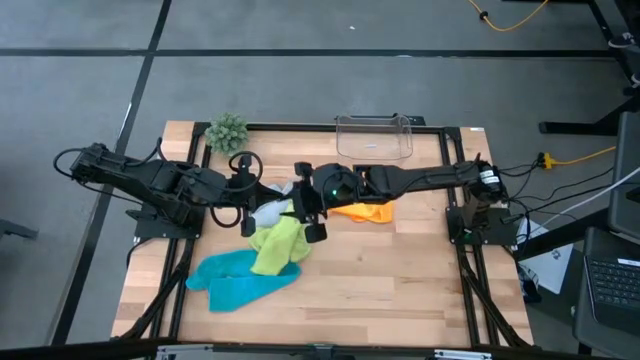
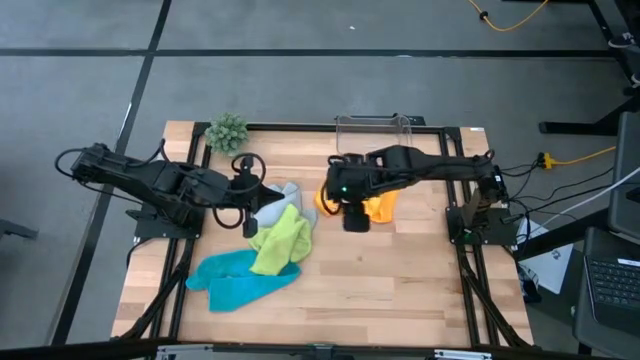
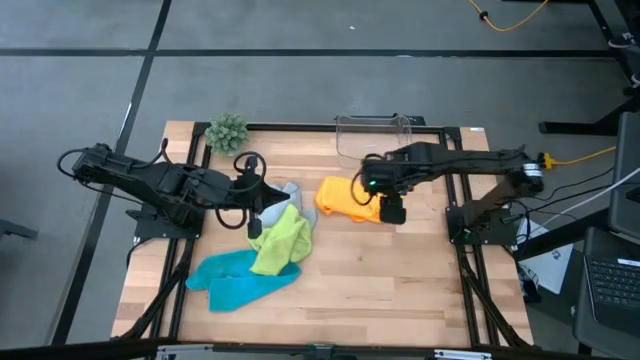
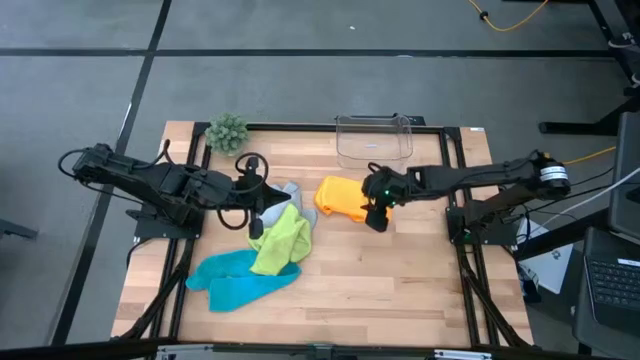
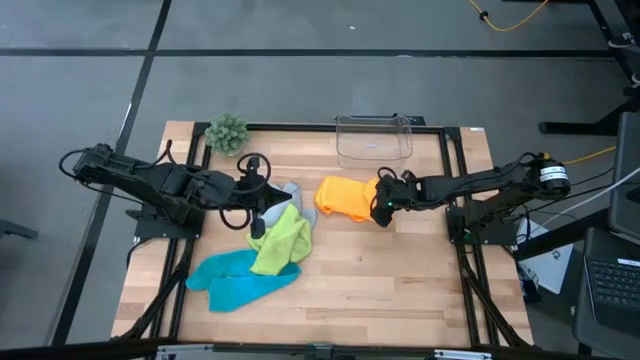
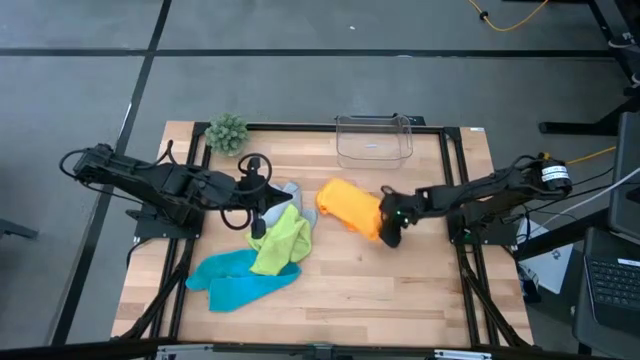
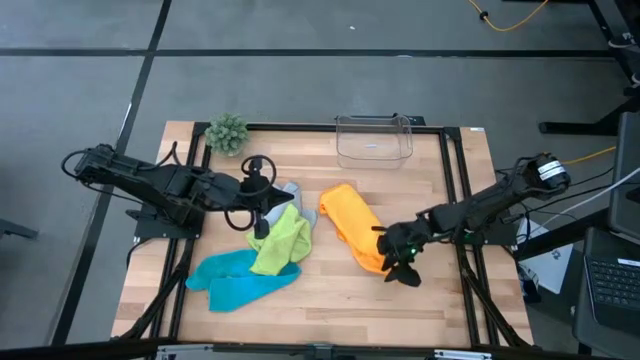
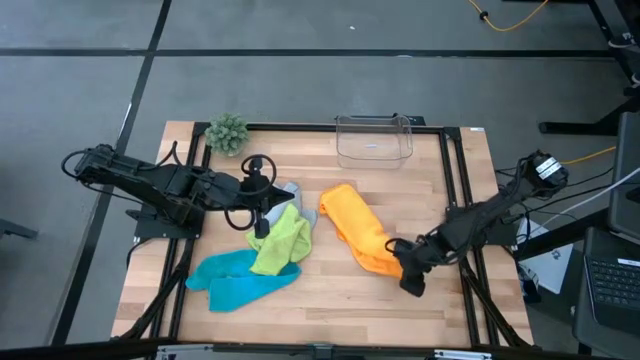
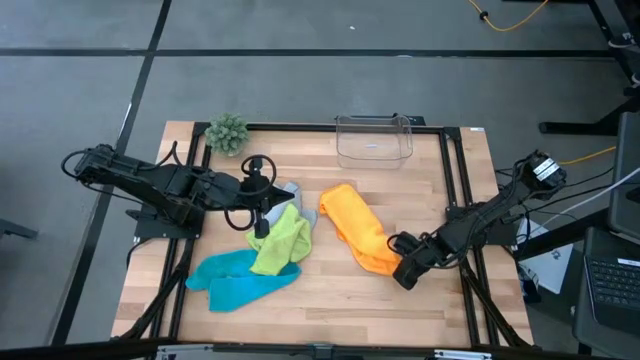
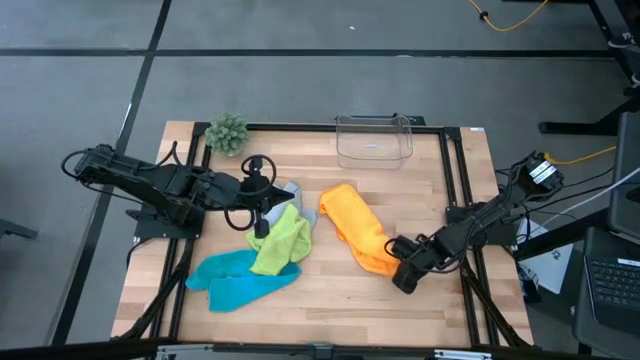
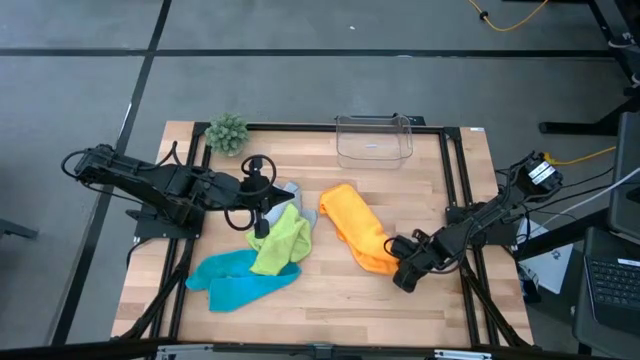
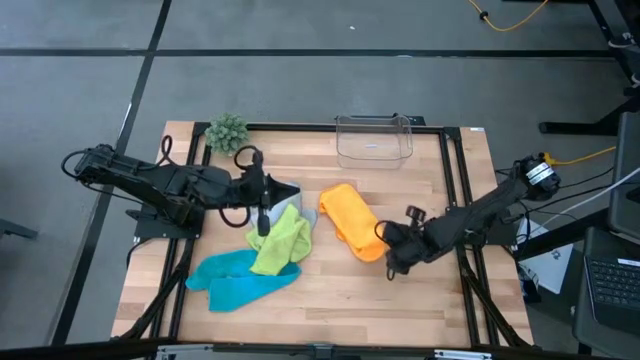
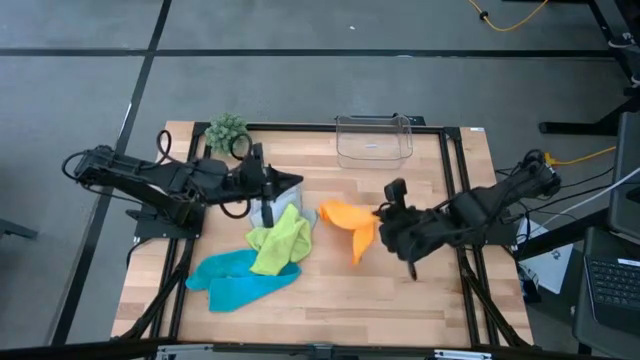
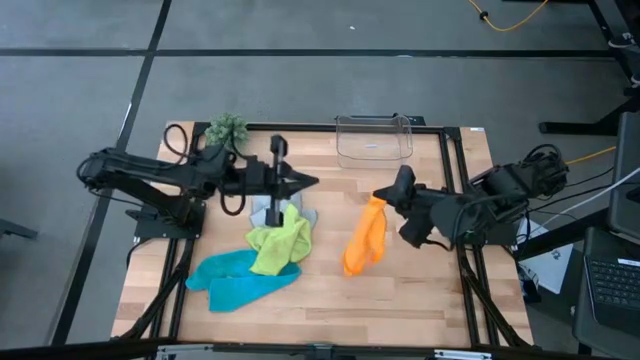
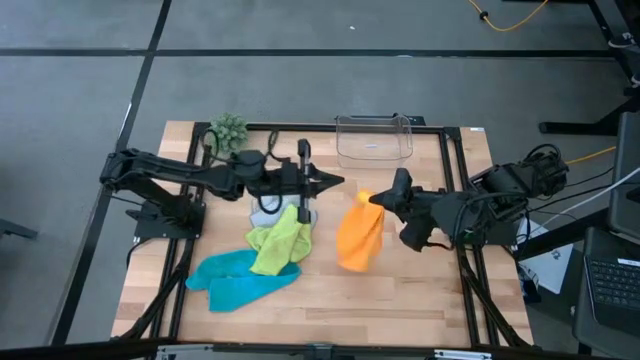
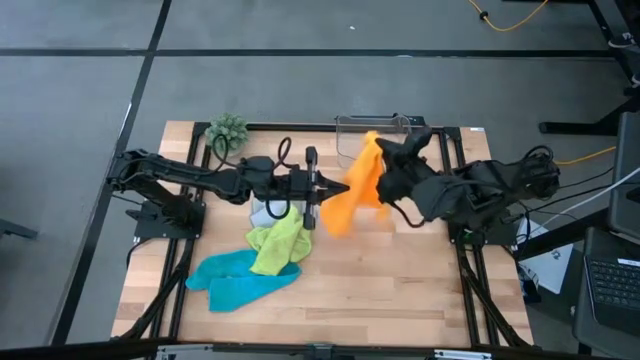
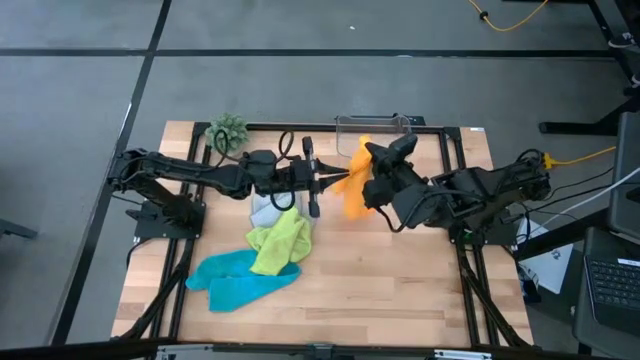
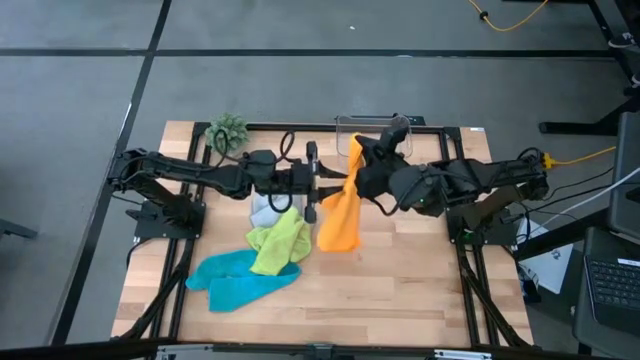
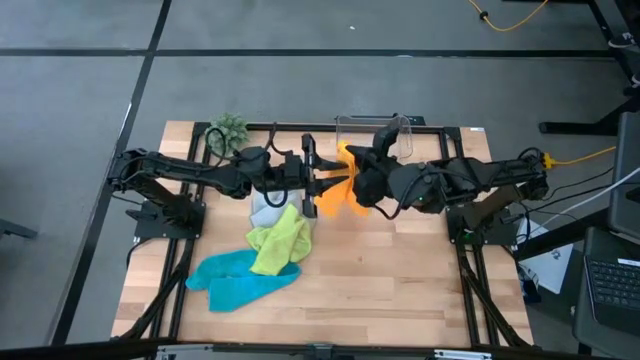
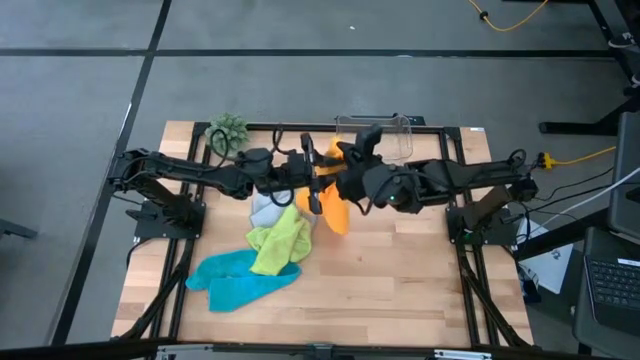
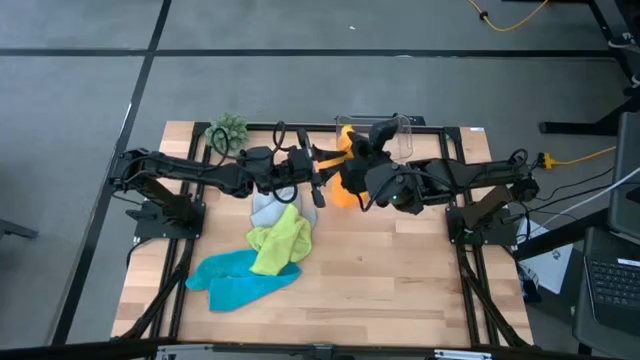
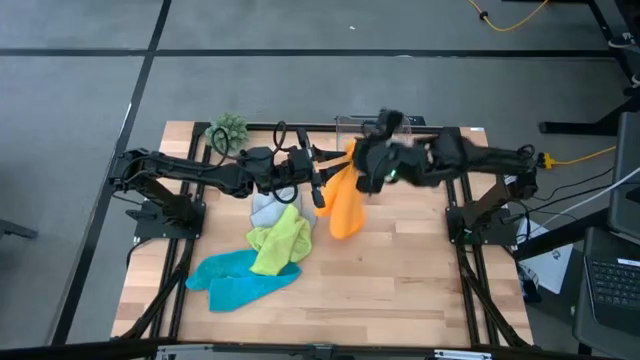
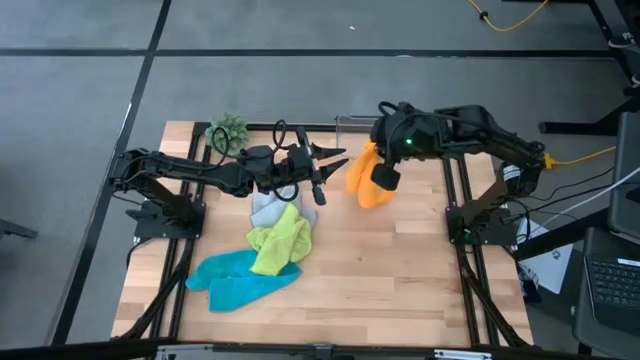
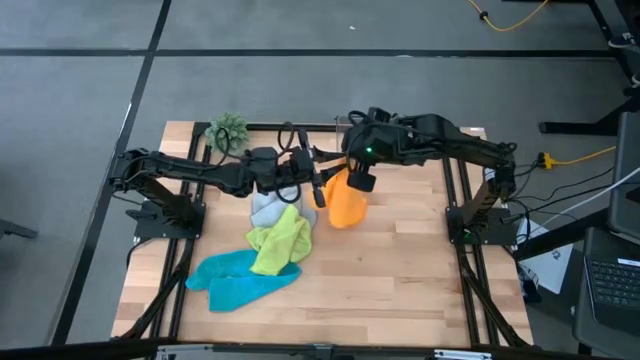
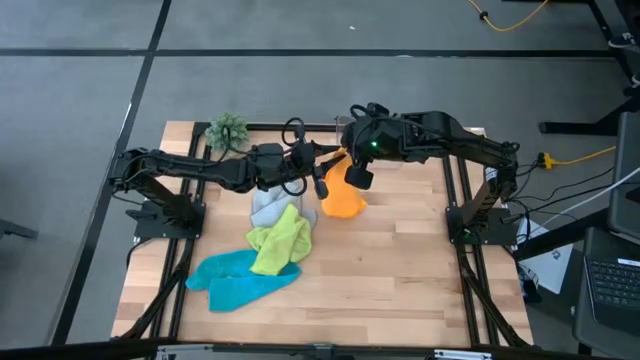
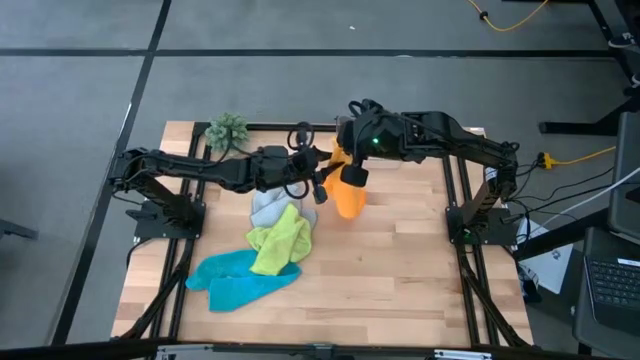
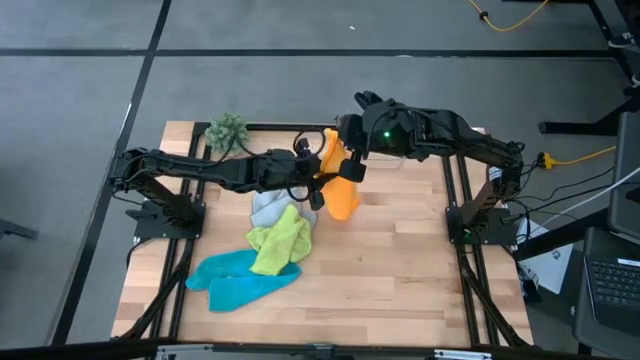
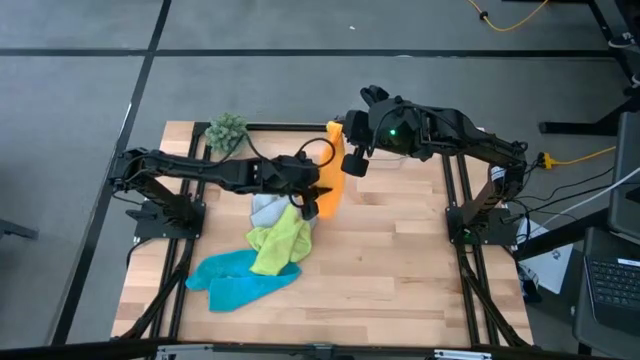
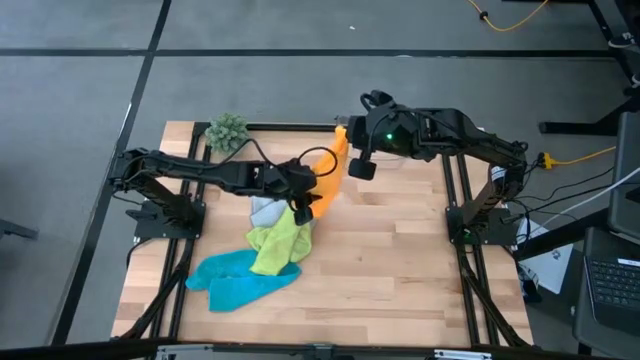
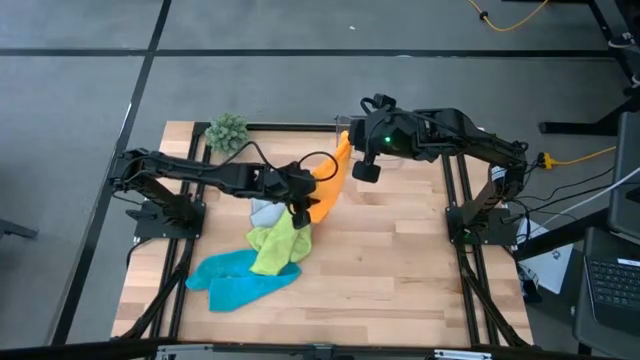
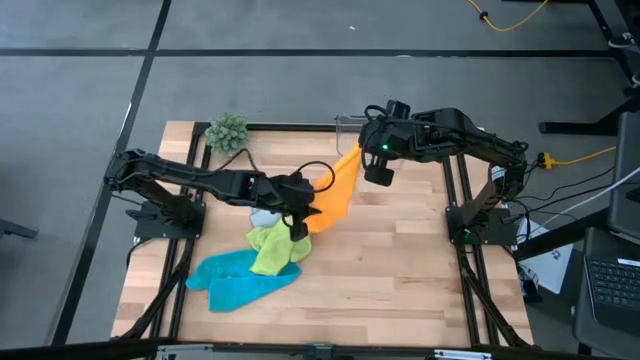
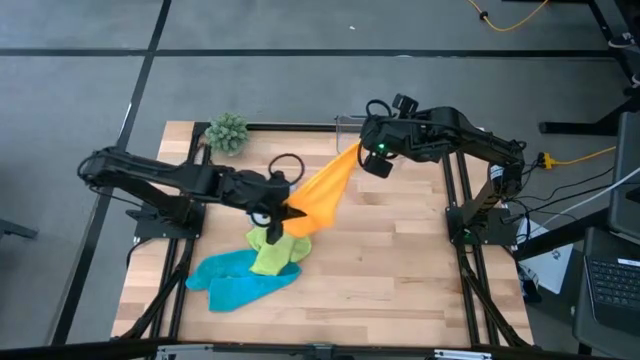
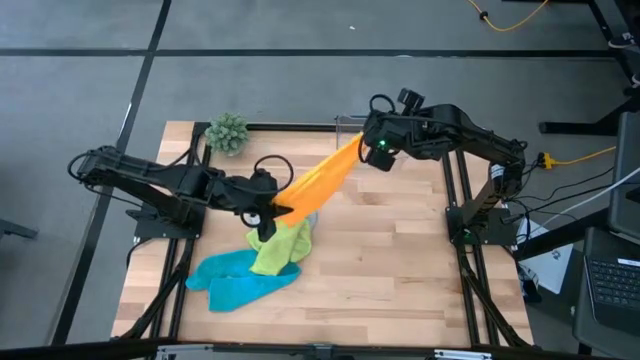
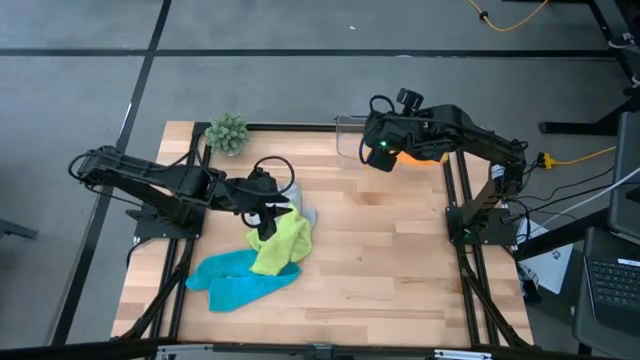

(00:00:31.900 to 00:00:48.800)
Task: Fold microfiber towels
Fold the orange microfiber cloth

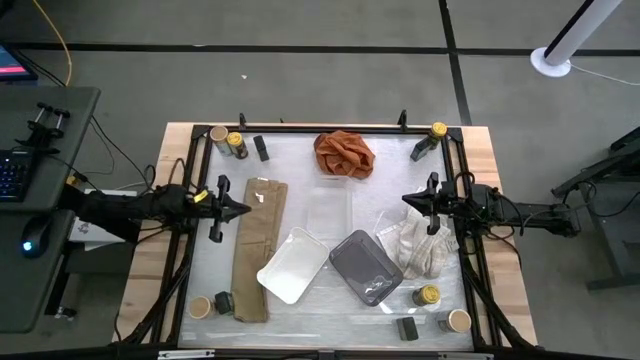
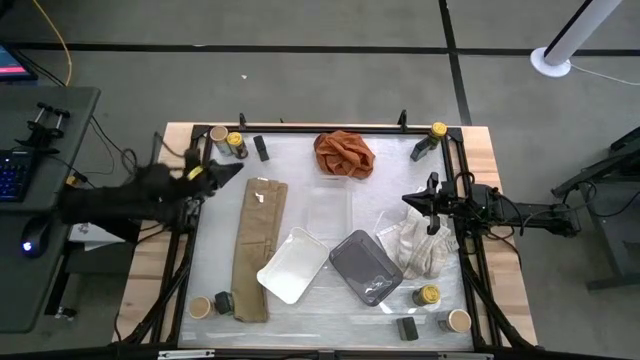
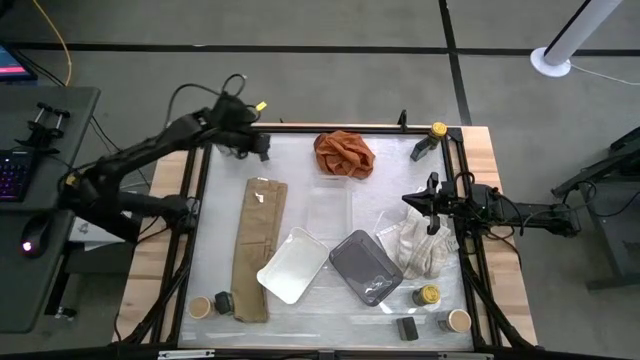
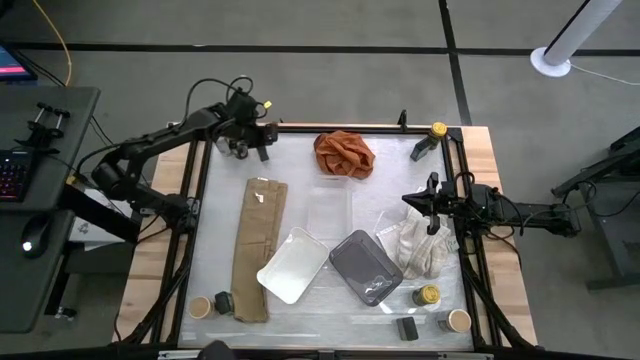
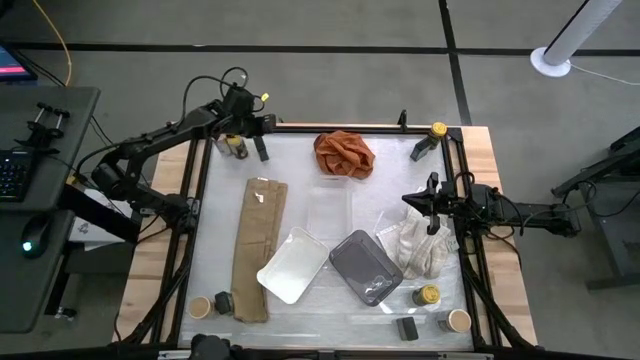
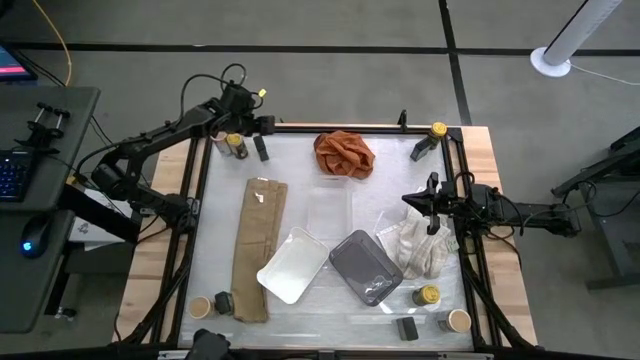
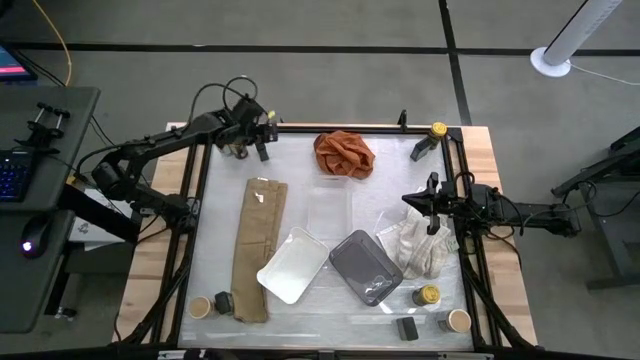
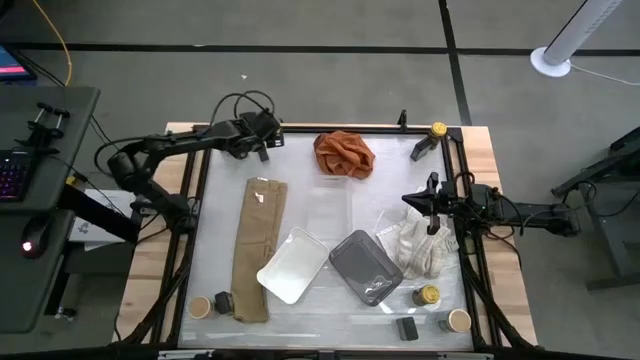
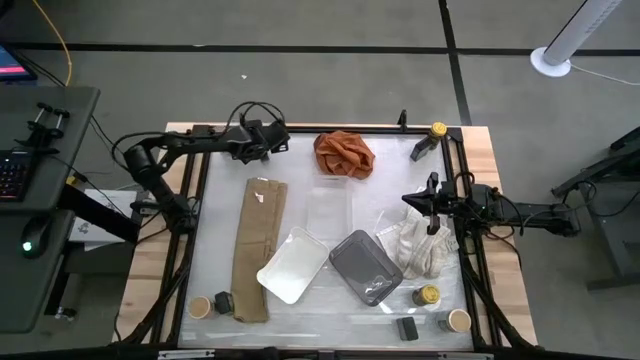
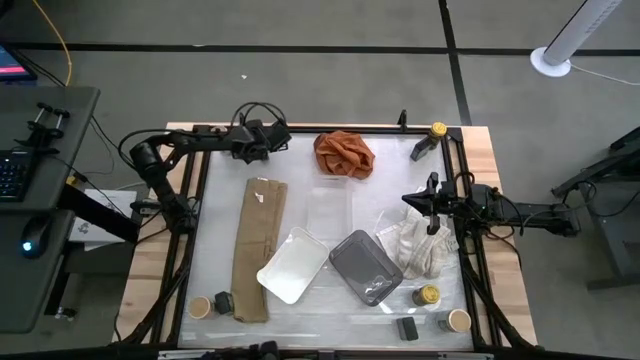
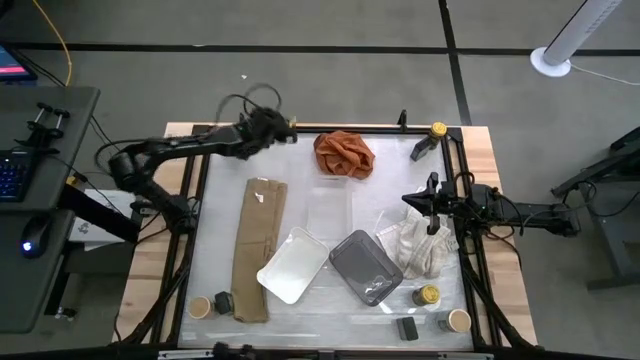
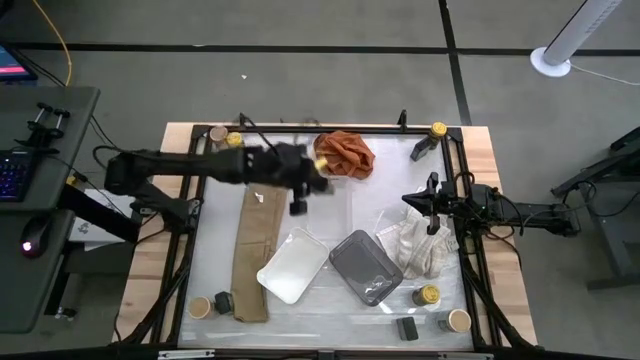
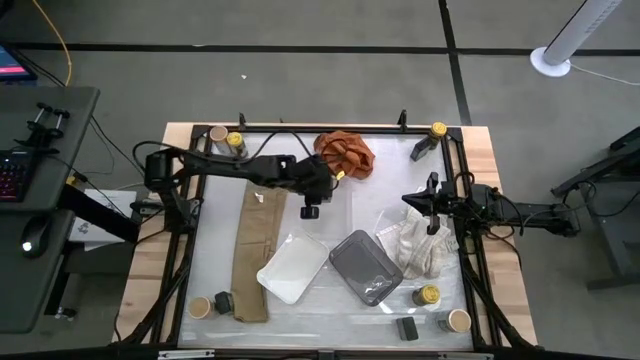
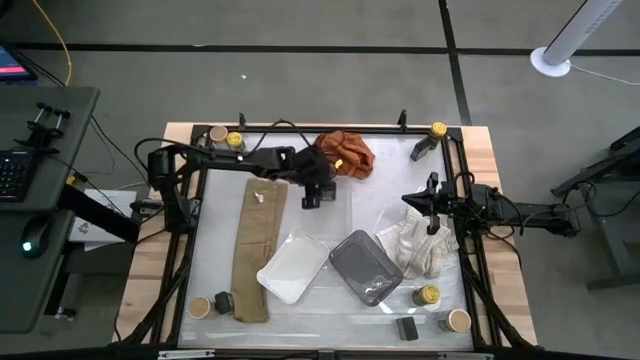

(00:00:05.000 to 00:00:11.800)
Task: Sort spices by type
Put the green seasoning can into the transparent bin
